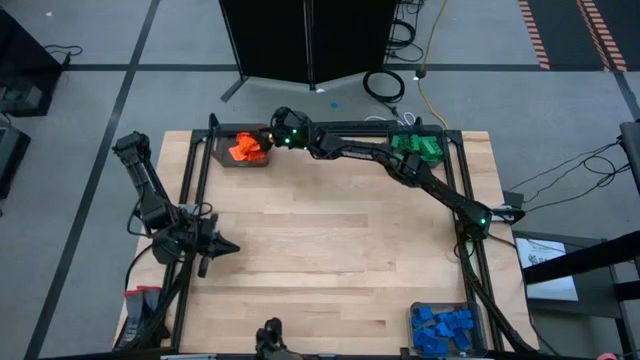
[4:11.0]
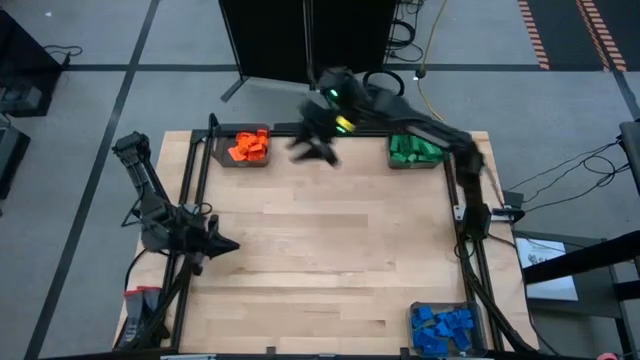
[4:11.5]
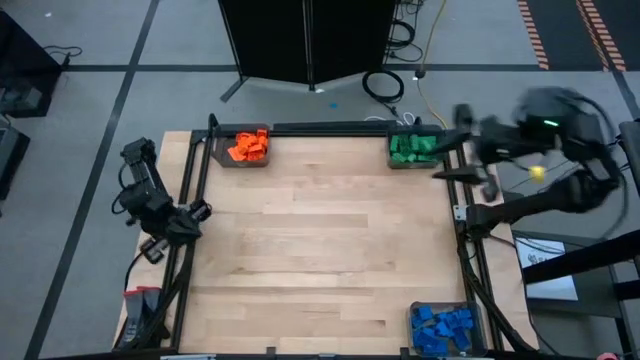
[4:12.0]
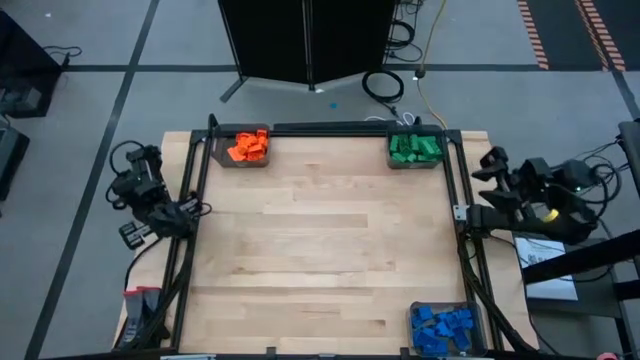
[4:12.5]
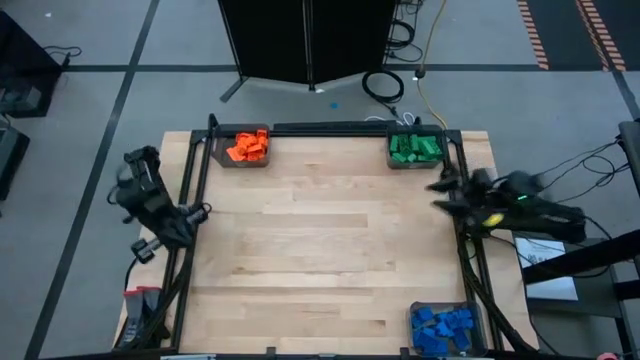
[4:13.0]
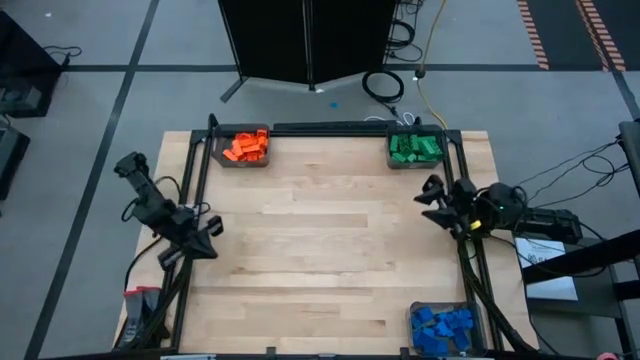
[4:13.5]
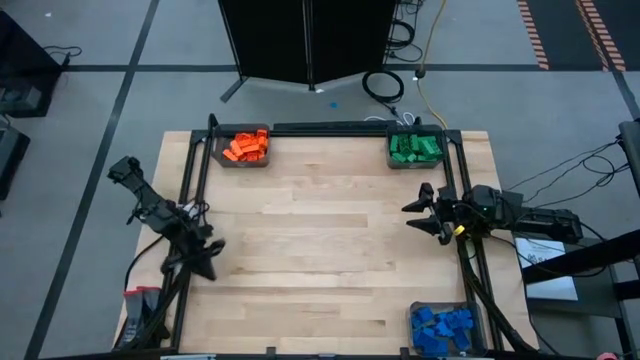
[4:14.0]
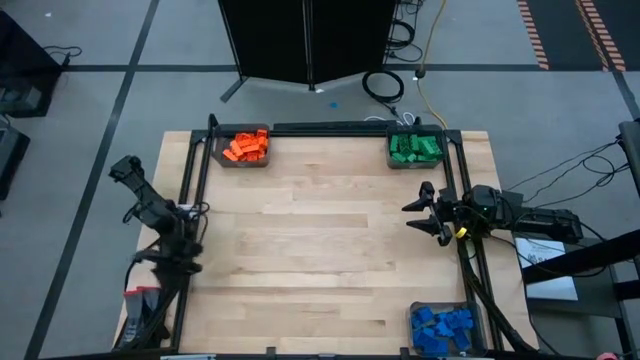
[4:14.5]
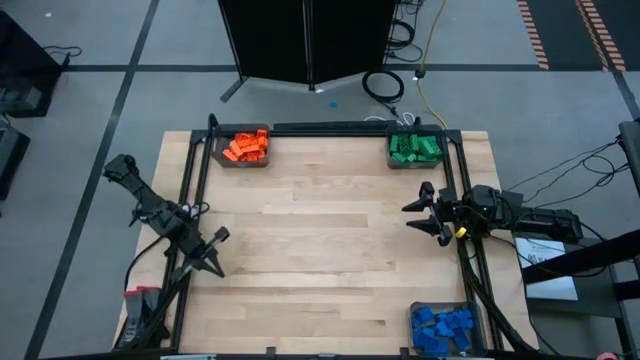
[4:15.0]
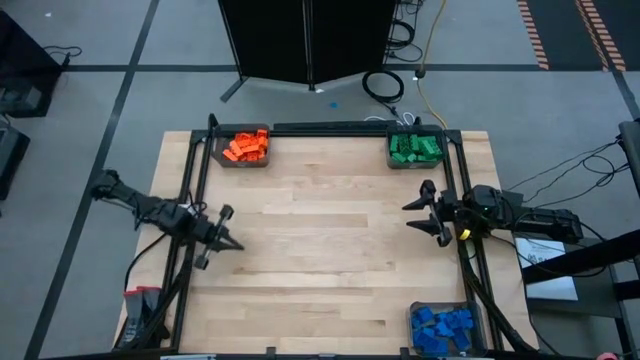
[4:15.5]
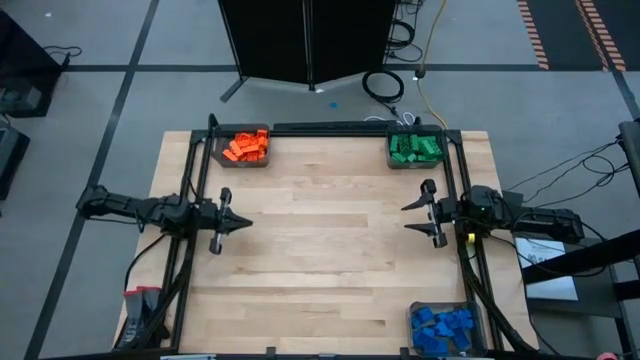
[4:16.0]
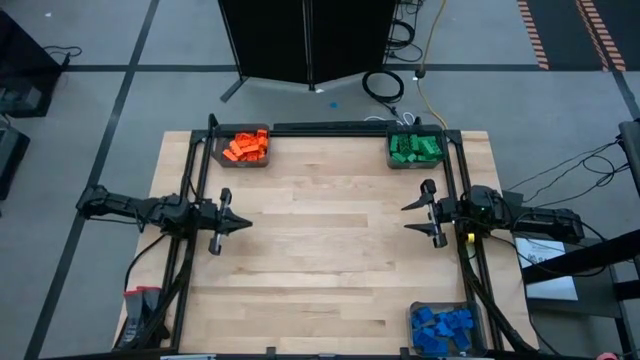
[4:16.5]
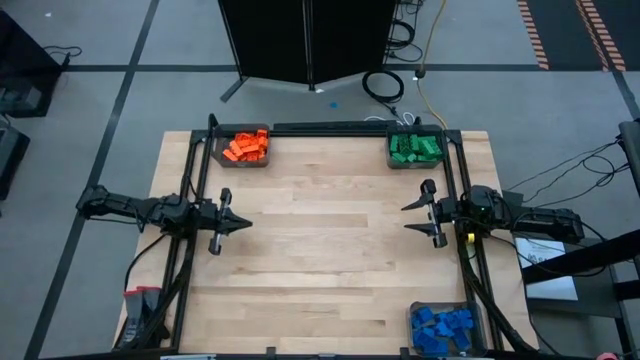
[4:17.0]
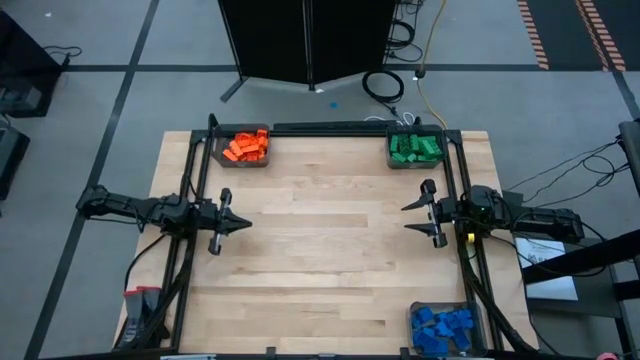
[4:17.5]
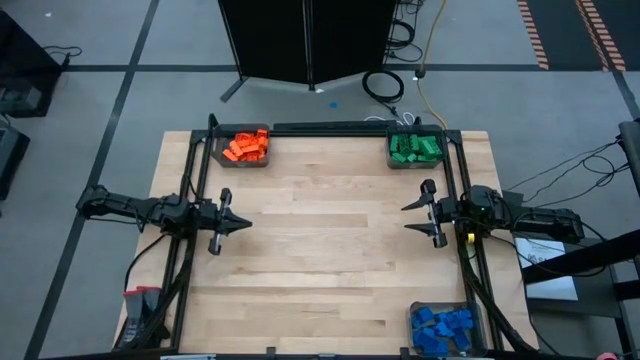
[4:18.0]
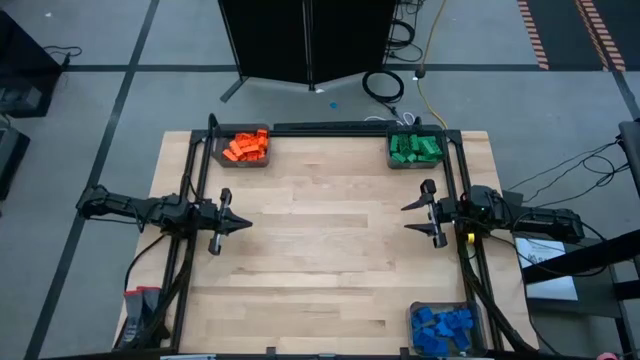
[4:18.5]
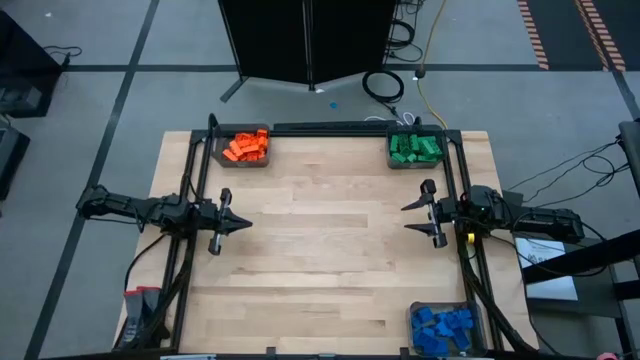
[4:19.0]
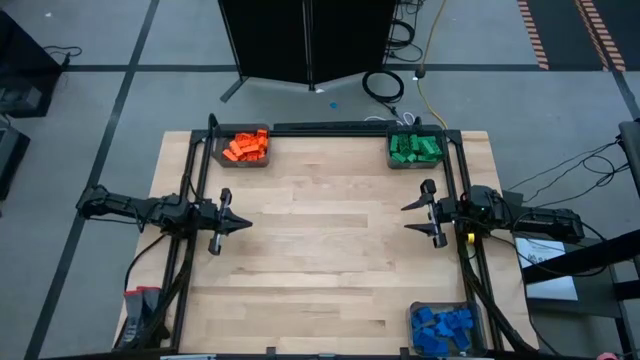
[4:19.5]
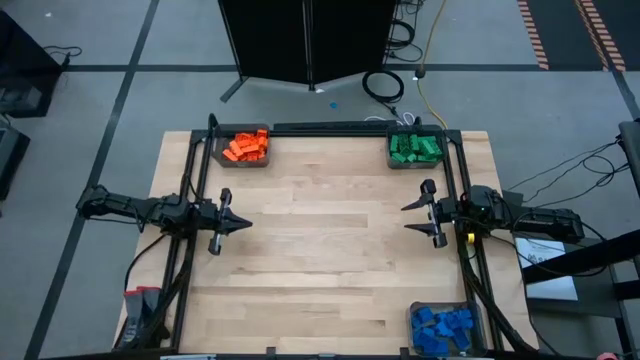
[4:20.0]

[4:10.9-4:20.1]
Task: Sort blocks
Return to Home Position

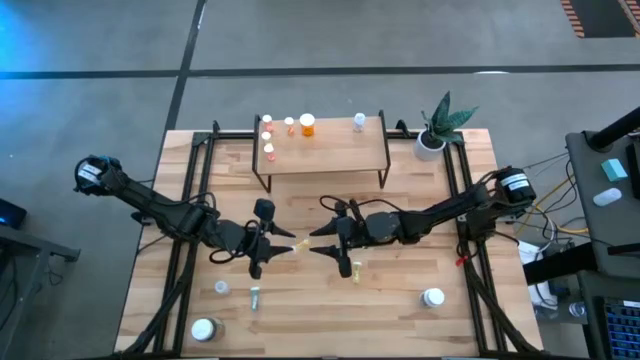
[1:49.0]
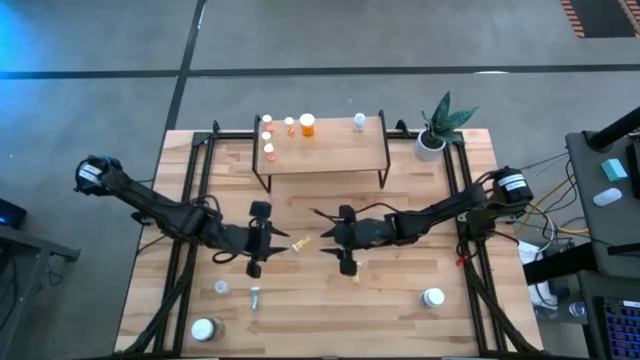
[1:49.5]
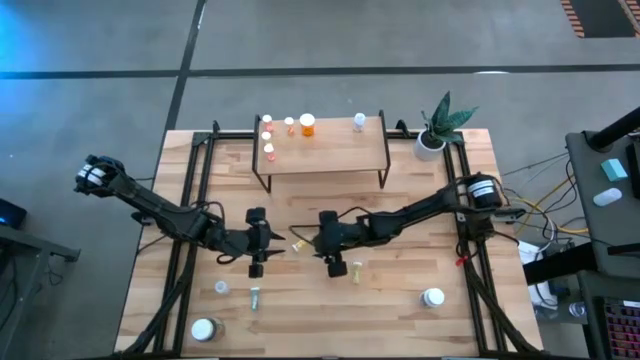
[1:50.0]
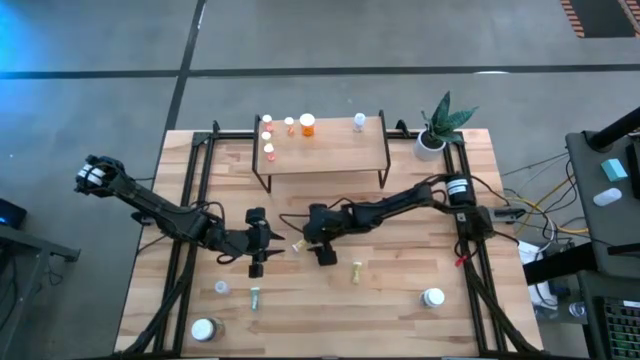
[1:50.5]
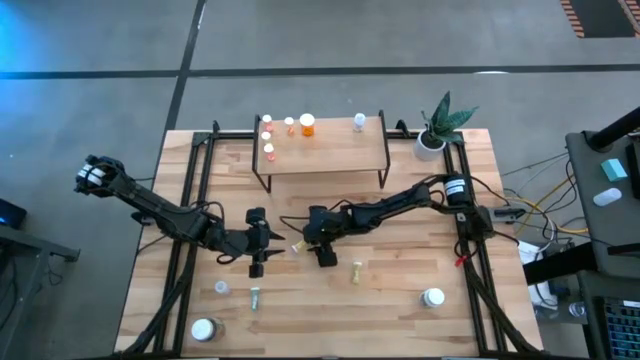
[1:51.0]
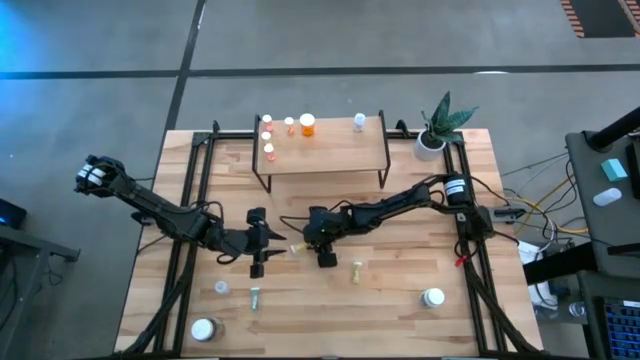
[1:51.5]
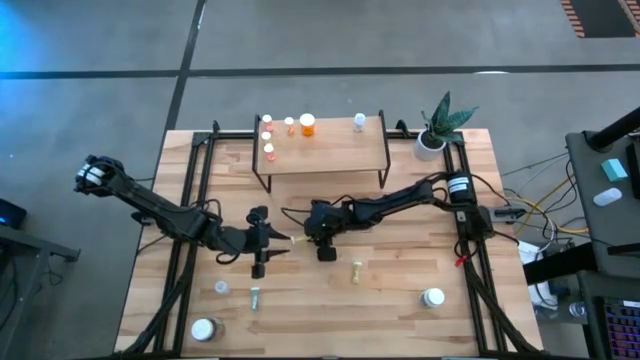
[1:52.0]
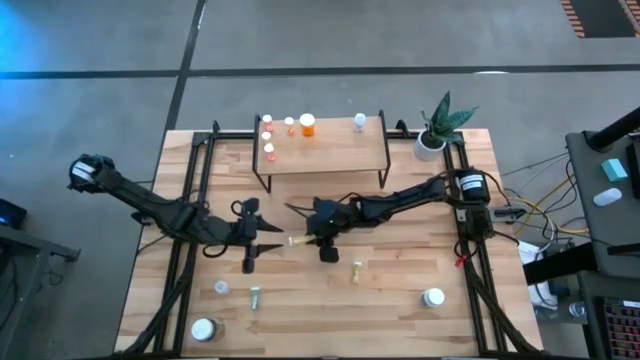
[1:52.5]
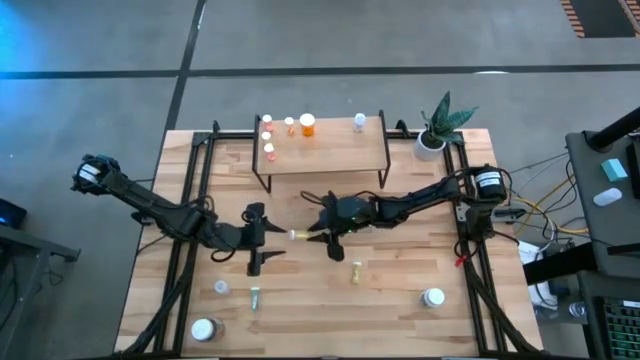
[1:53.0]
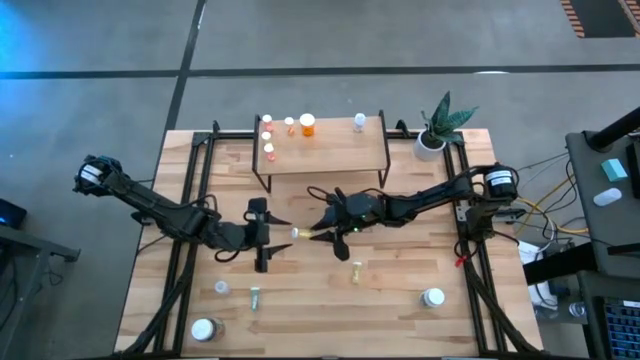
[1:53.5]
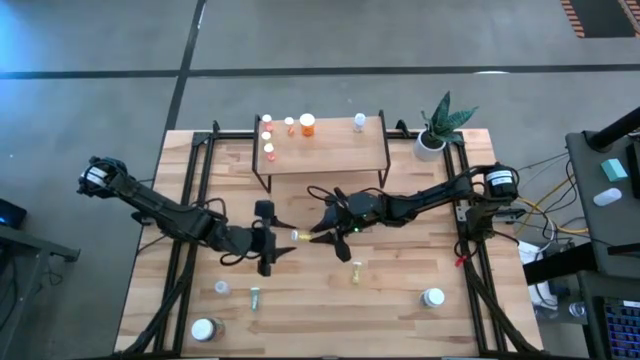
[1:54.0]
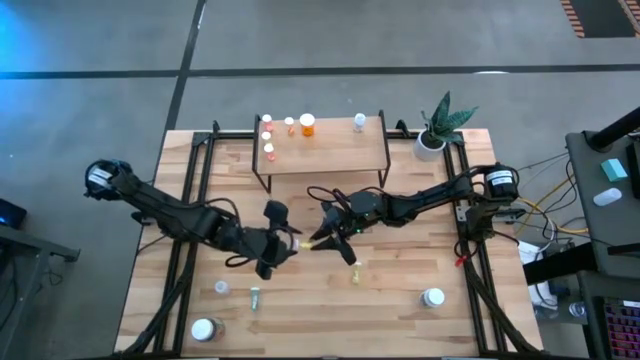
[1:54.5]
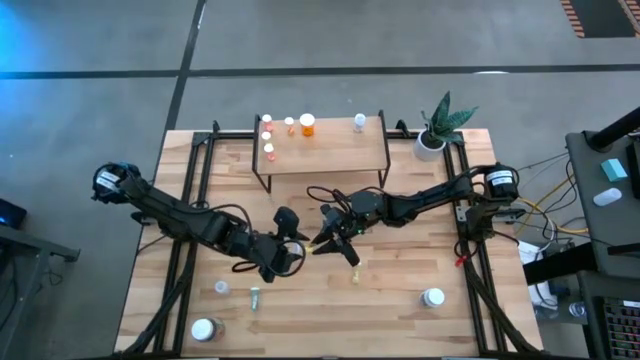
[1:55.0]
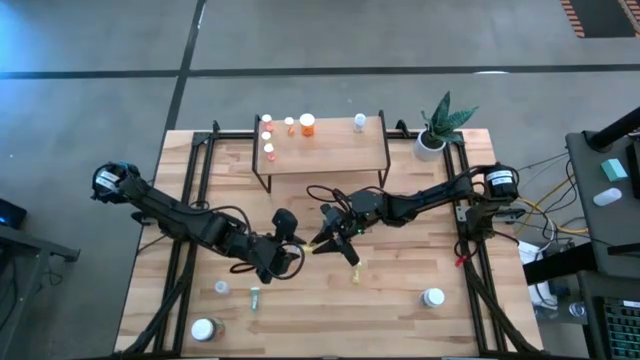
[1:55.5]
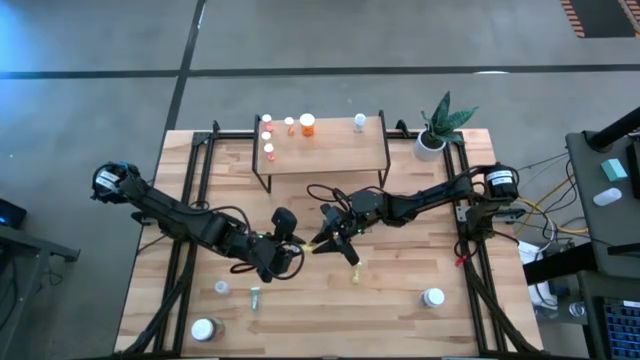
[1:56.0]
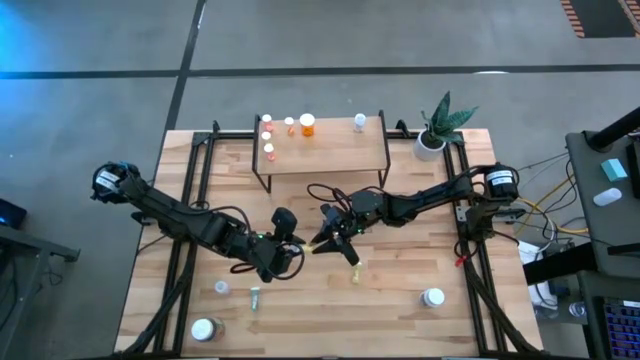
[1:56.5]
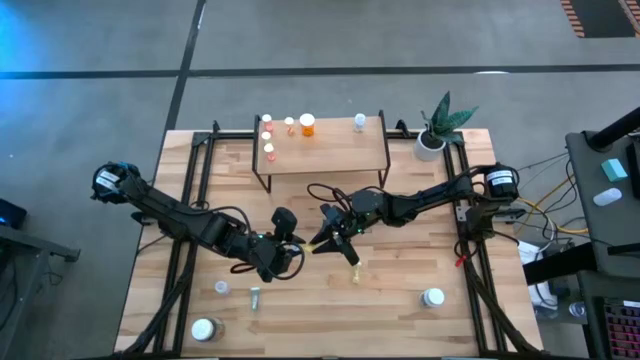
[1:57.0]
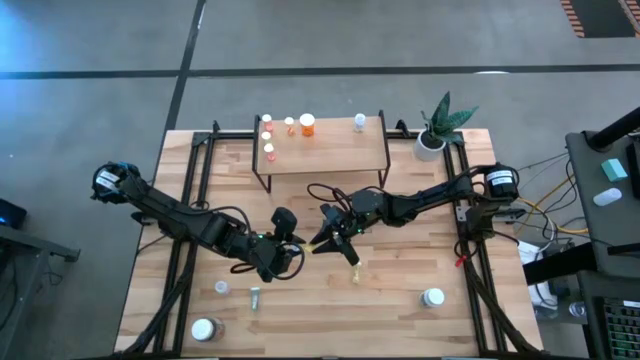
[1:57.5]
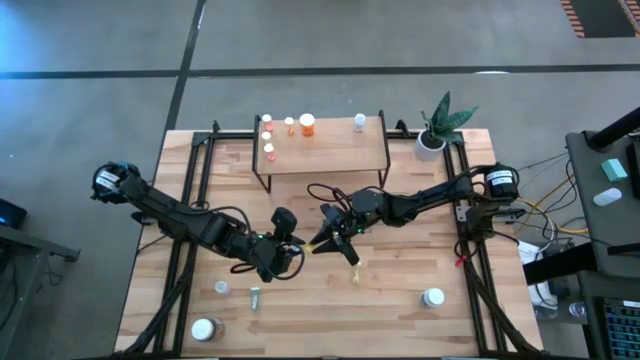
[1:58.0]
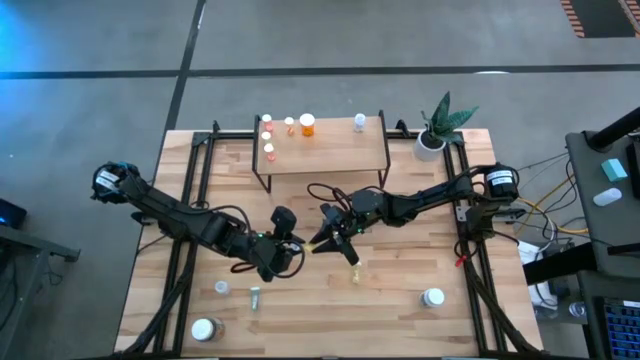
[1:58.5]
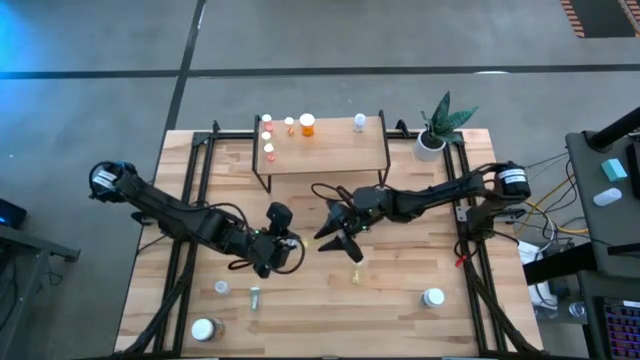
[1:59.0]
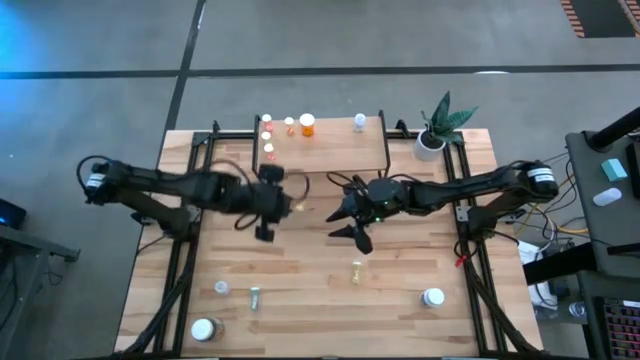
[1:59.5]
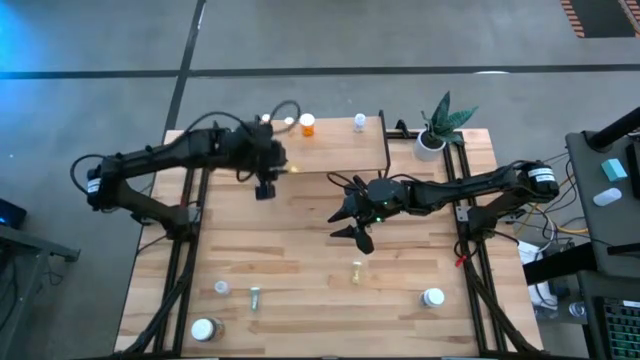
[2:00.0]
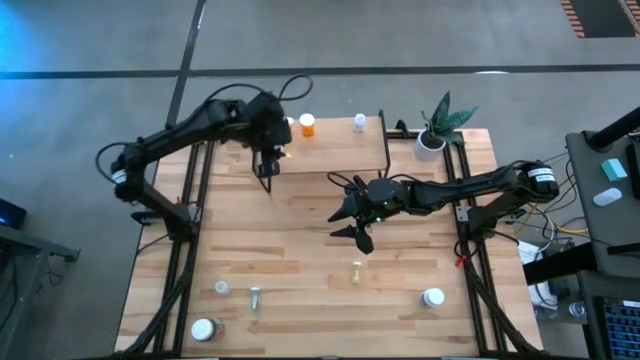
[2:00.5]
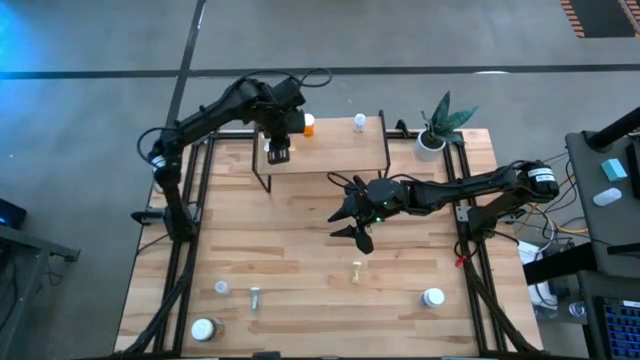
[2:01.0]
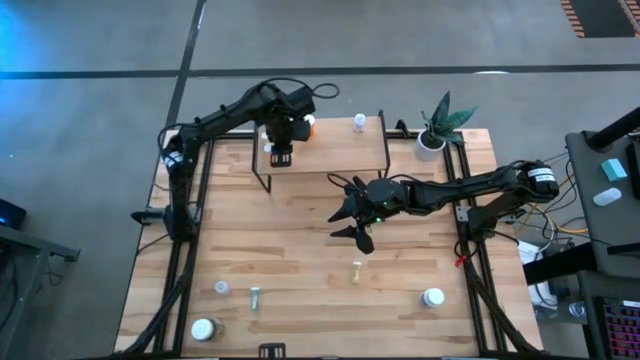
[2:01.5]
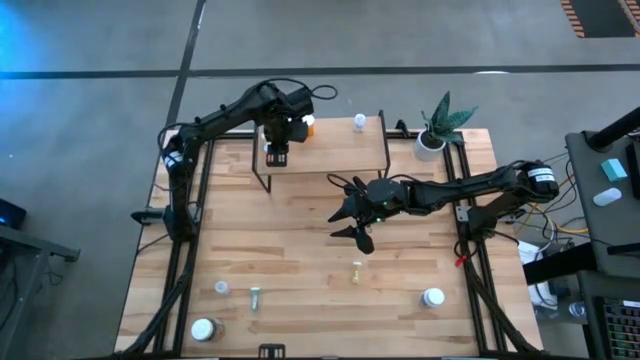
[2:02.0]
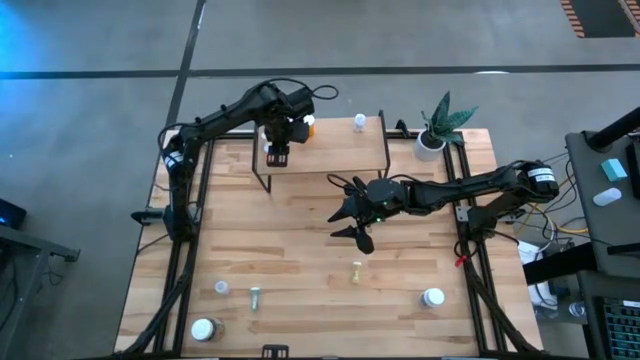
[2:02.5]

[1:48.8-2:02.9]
Task: Pick and place medicine bottles onto shelf by color
Put the left yellow pill bottle on the shelf
